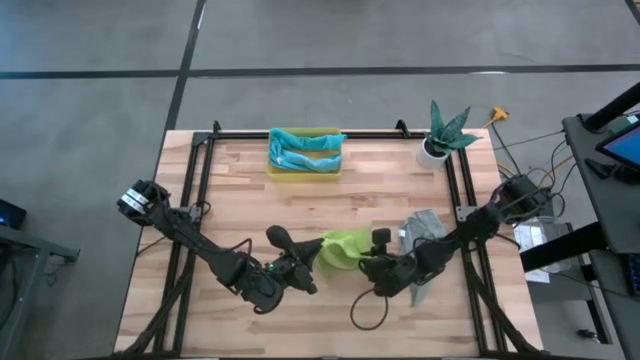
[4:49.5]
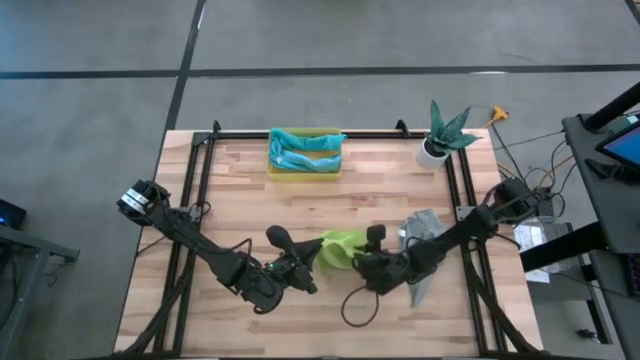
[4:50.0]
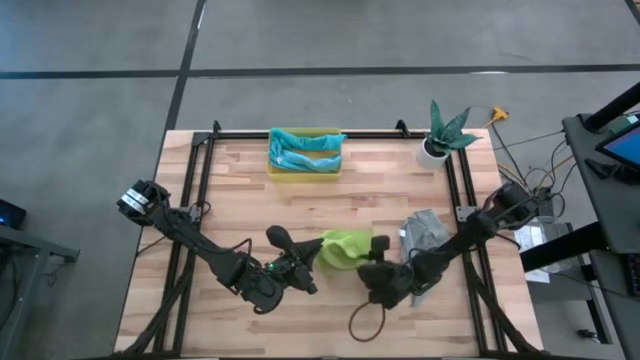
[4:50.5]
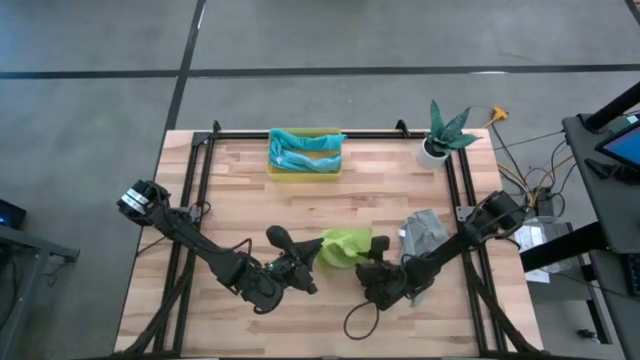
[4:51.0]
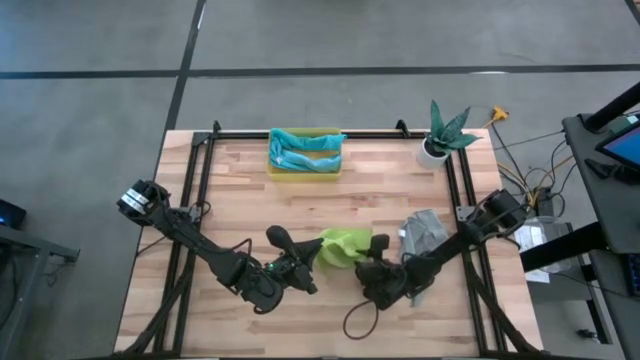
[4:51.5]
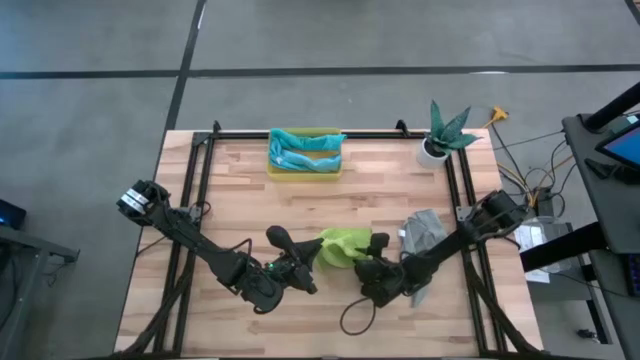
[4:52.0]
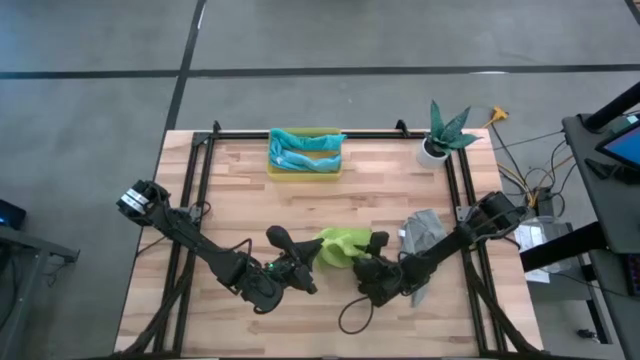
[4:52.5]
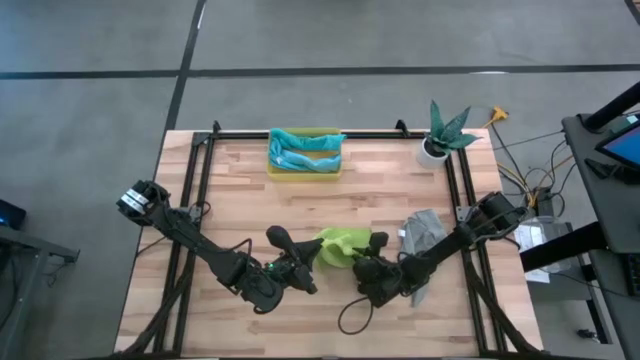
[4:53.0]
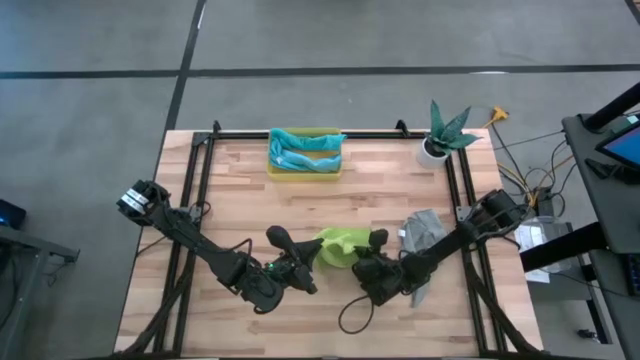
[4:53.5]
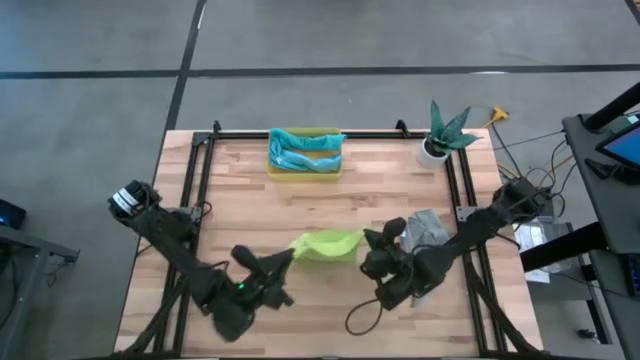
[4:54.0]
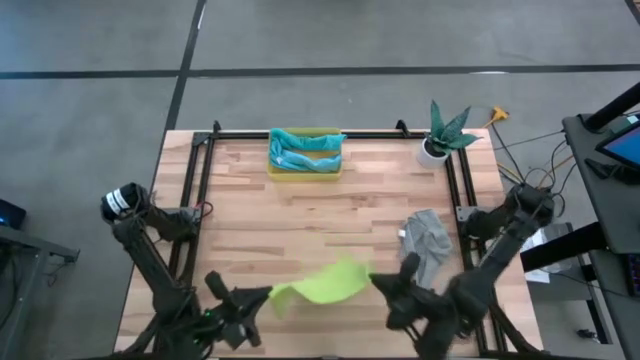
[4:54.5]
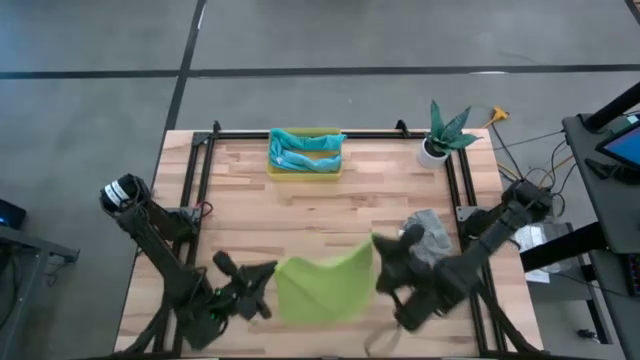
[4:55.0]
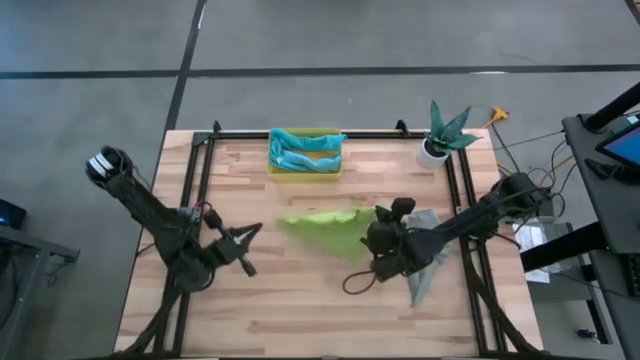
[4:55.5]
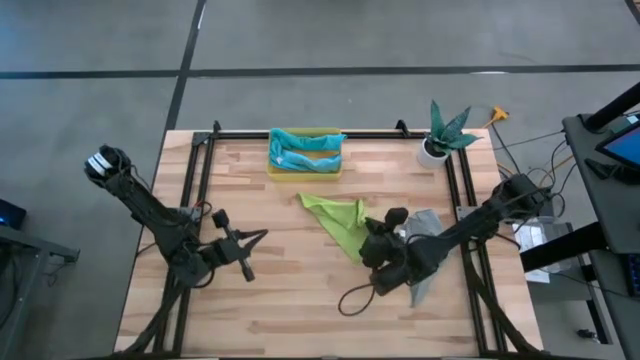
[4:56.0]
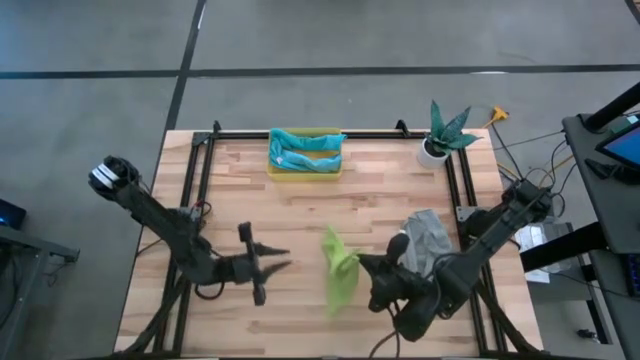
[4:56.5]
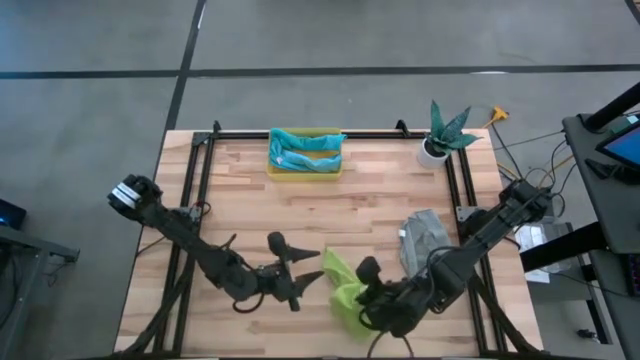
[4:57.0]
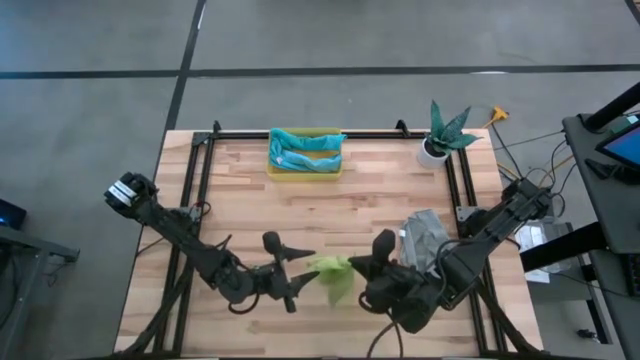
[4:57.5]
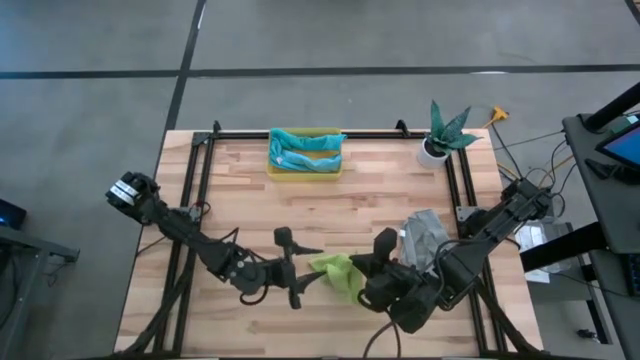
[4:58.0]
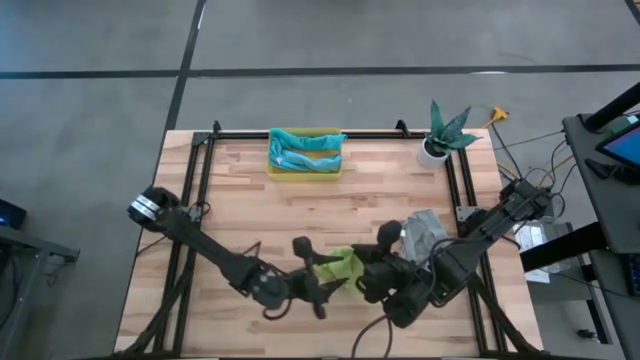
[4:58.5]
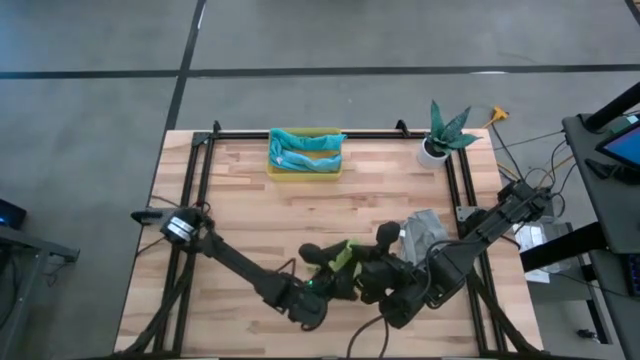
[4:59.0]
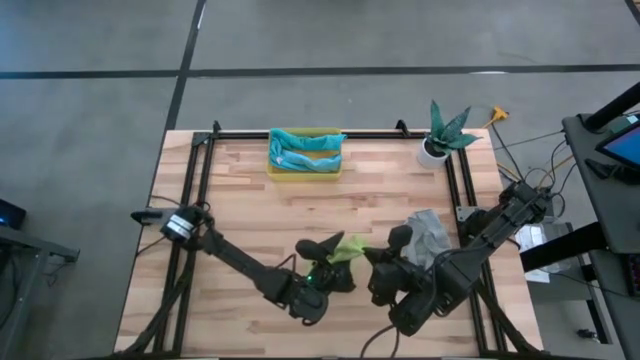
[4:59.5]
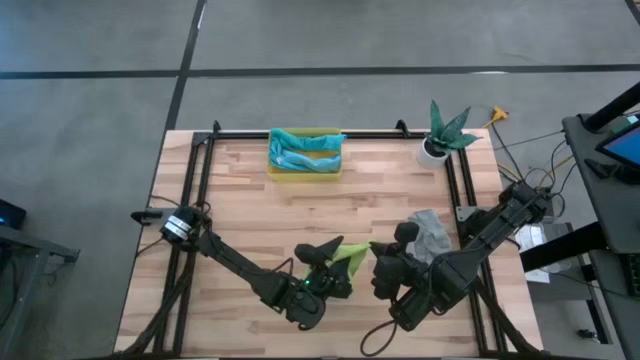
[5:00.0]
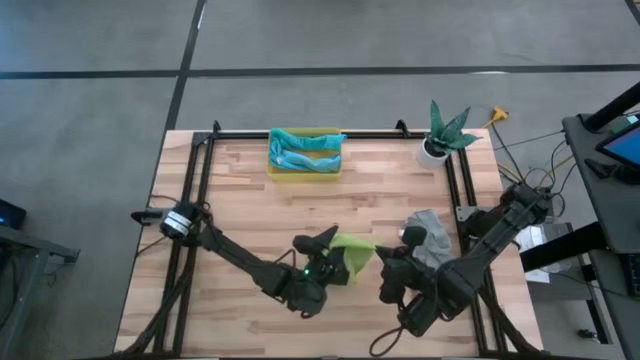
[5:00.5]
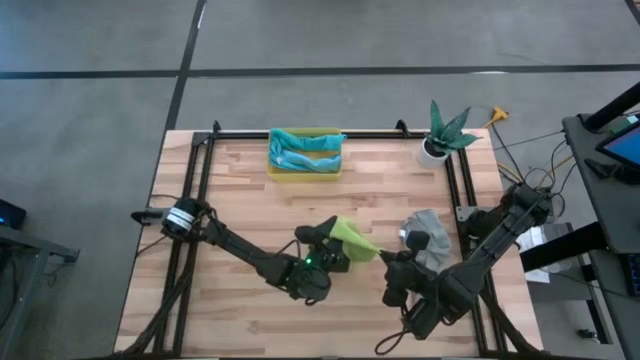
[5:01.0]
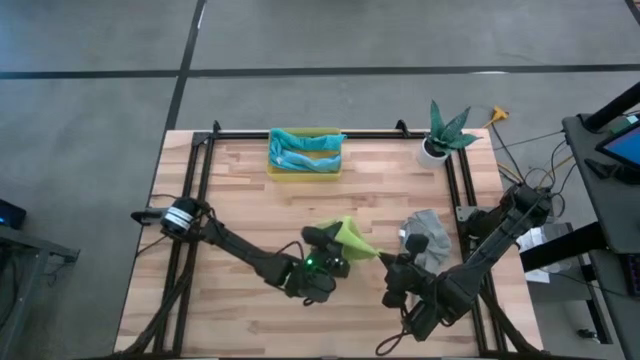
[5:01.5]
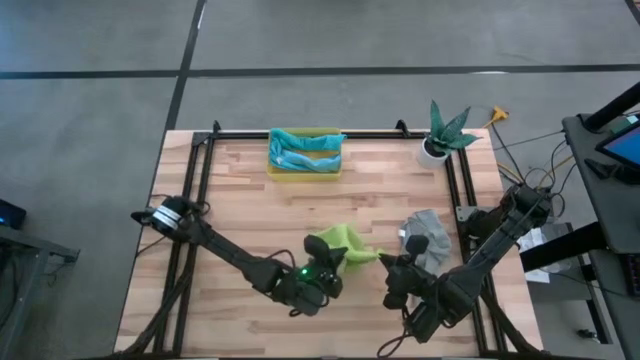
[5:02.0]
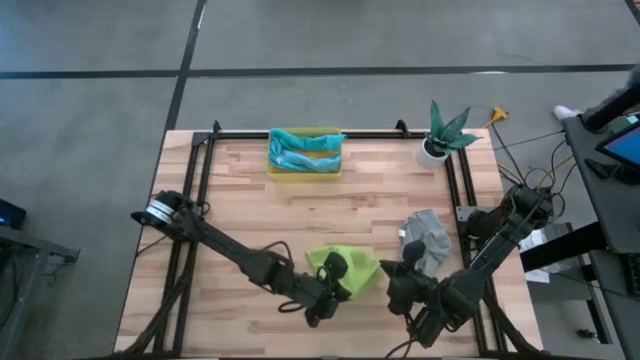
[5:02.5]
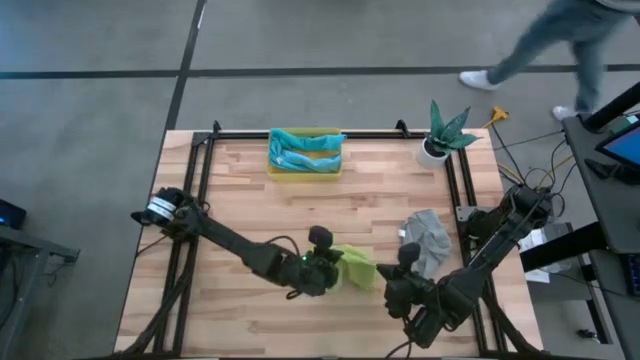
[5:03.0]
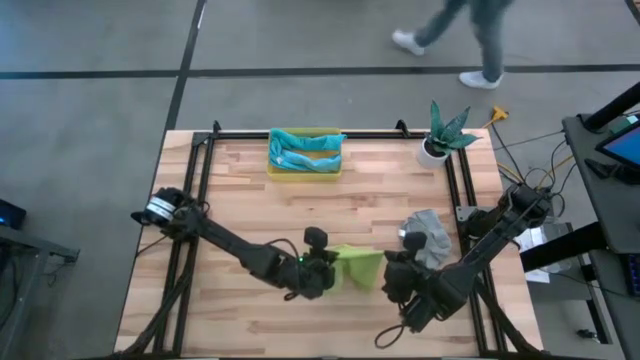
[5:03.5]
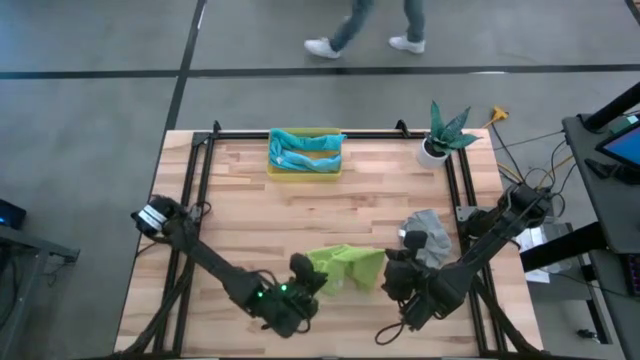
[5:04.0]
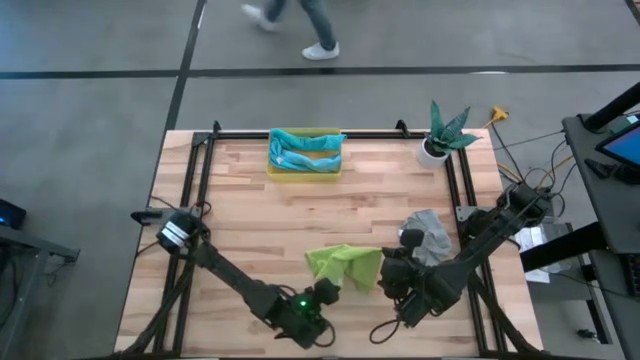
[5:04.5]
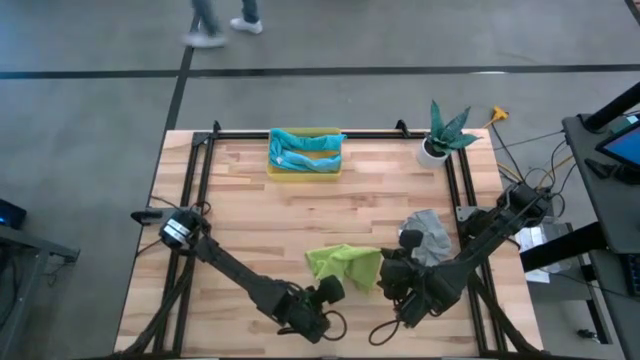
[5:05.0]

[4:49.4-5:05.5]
Task: Roll microfiber towels into tight, uniform cylinder then place into a basket
Roll the green towel

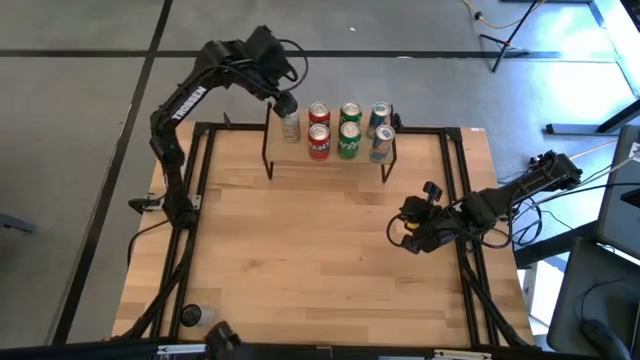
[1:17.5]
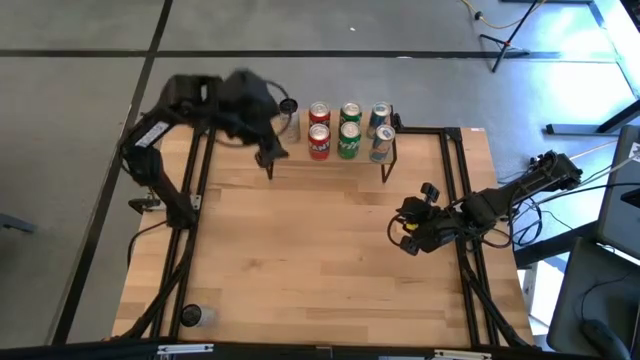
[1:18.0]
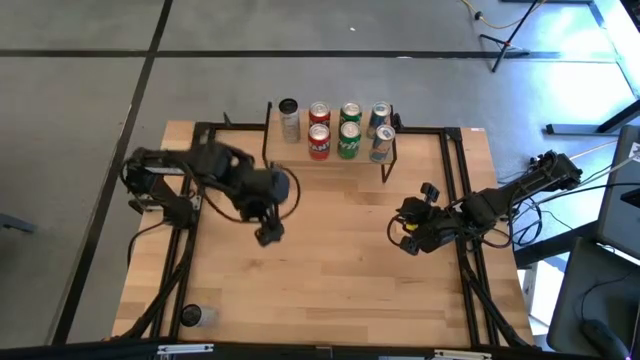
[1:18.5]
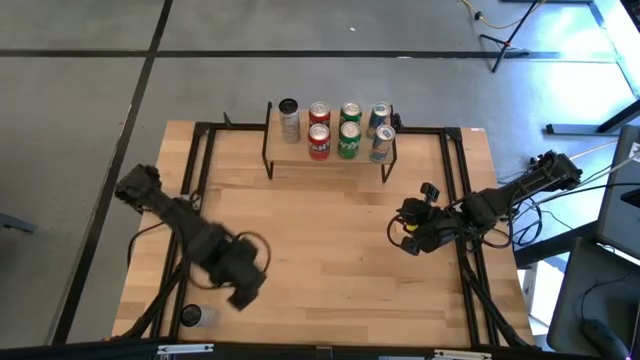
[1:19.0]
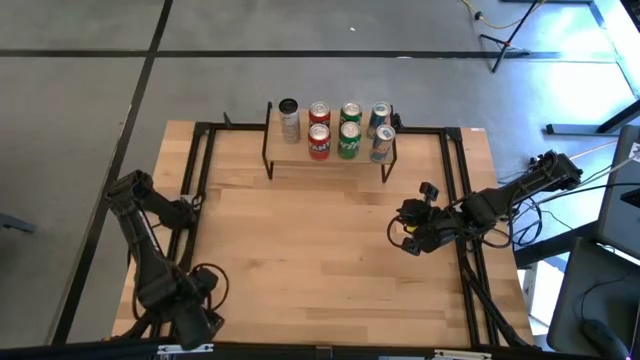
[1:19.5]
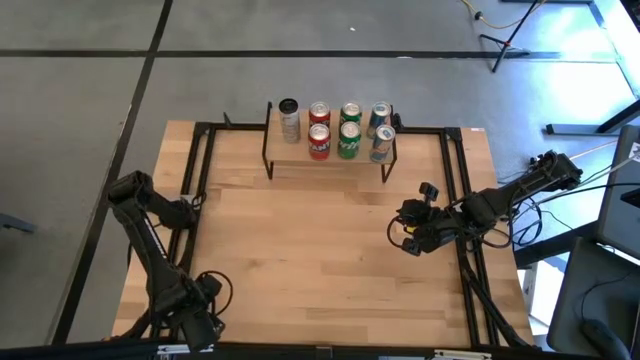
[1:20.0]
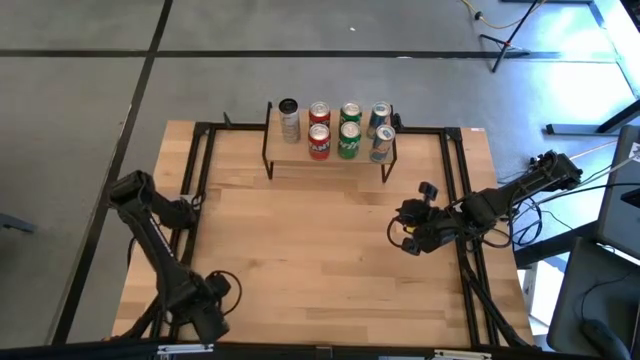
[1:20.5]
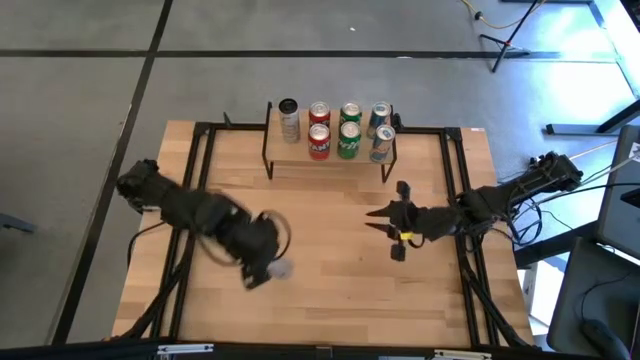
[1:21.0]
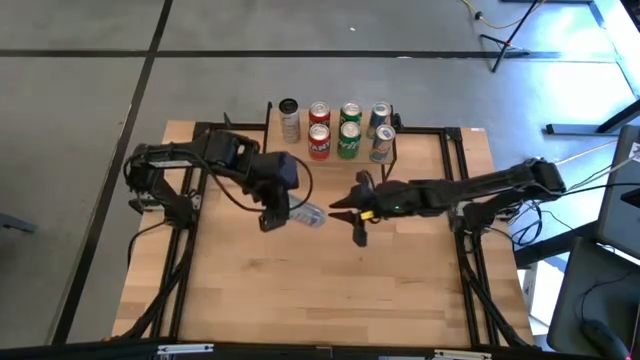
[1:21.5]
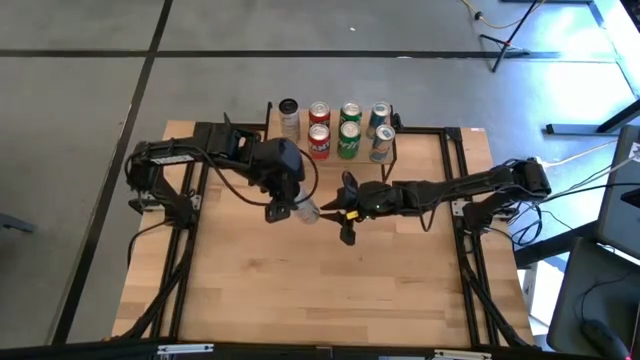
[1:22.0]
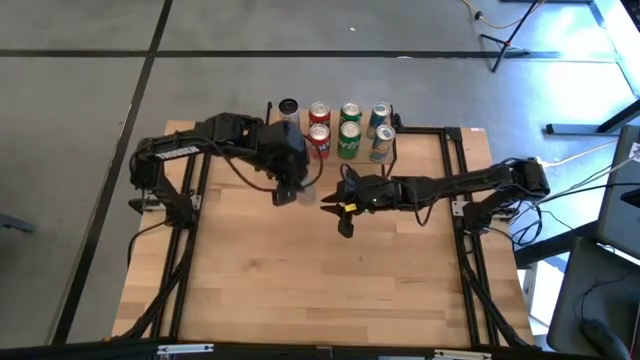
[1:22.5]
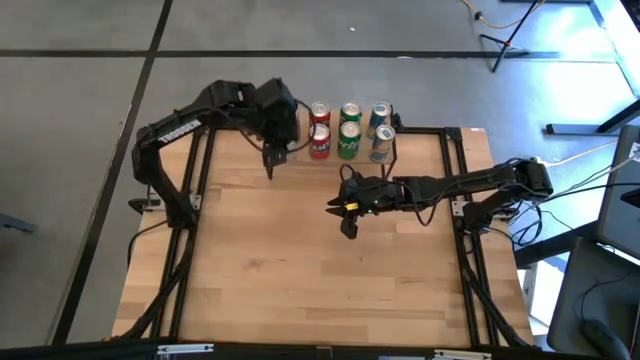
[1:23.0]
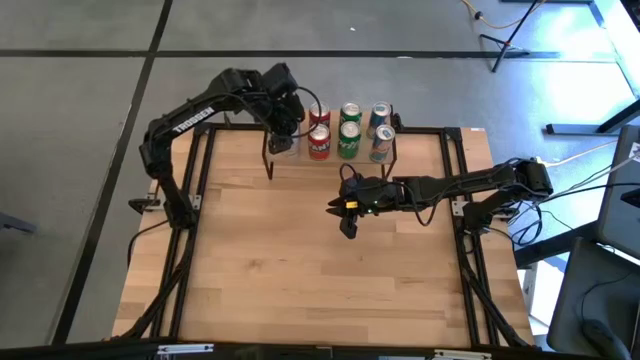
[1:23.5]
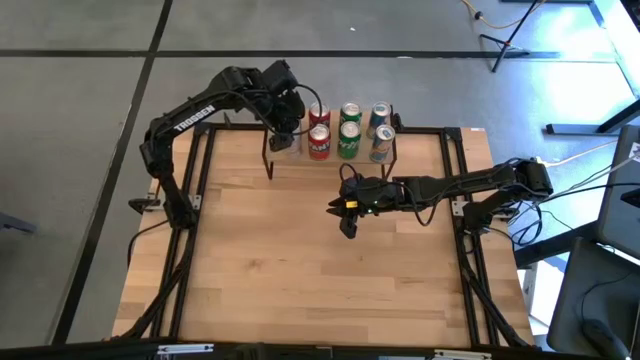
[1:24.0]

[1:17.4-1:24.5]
Task: Place canned beverage on shelf
Put the white and yellow soda can on the shelf aligned with the other white and yellow soda can
